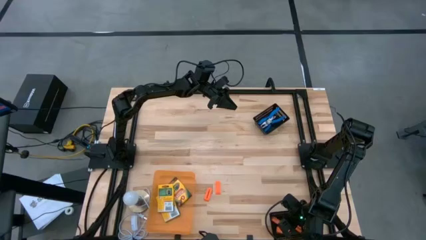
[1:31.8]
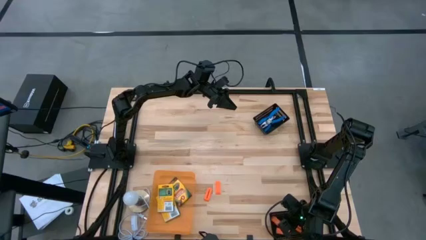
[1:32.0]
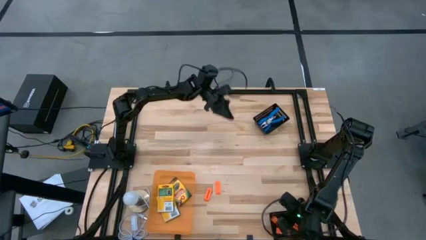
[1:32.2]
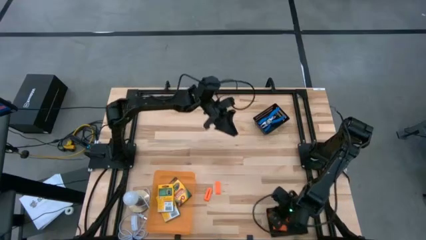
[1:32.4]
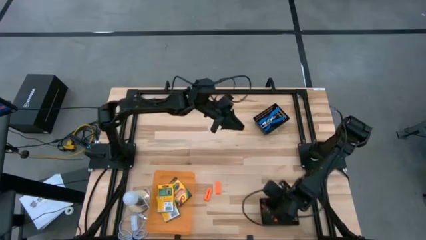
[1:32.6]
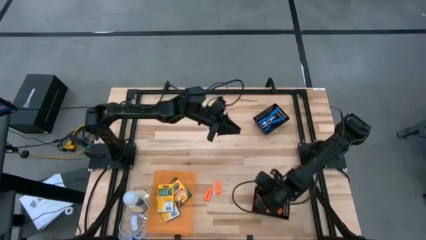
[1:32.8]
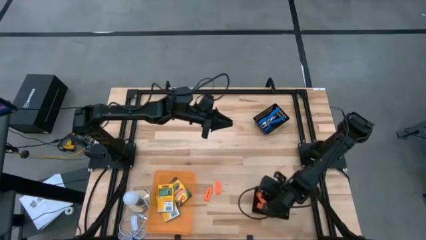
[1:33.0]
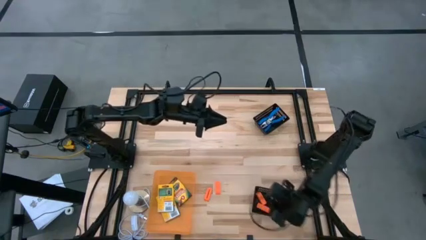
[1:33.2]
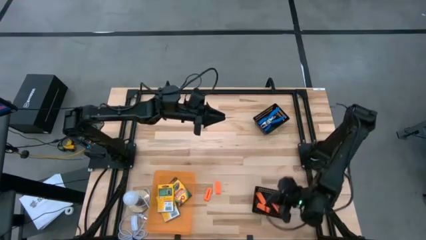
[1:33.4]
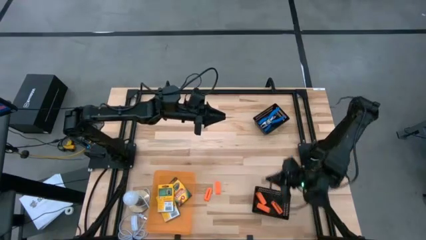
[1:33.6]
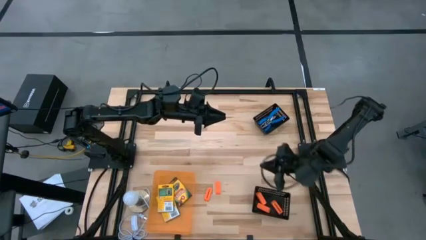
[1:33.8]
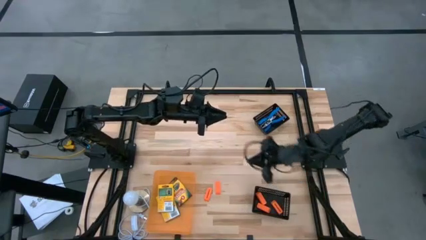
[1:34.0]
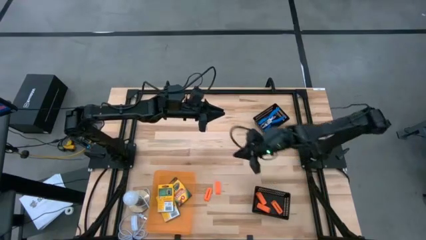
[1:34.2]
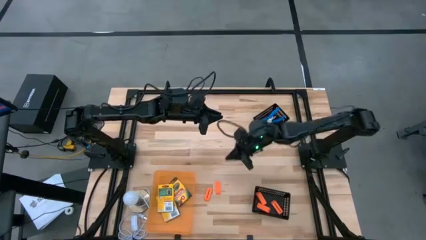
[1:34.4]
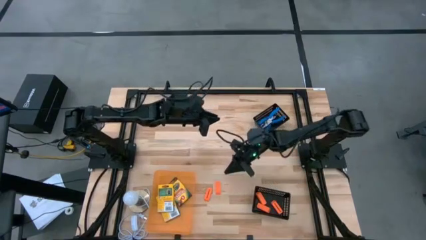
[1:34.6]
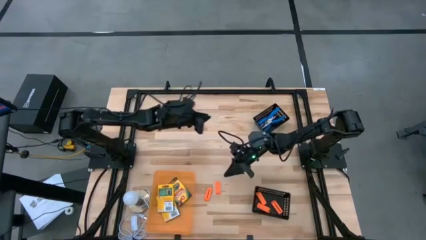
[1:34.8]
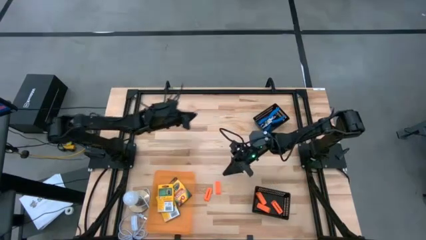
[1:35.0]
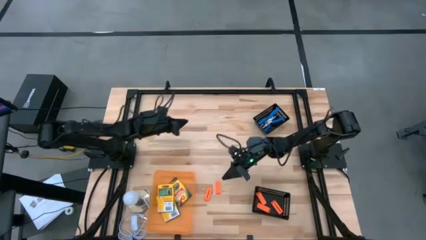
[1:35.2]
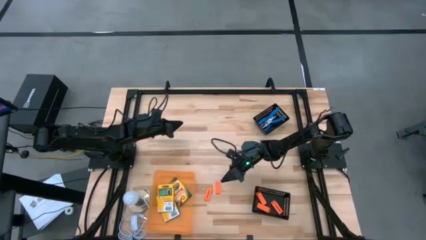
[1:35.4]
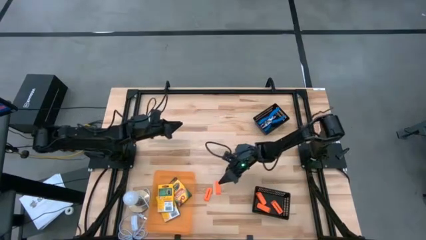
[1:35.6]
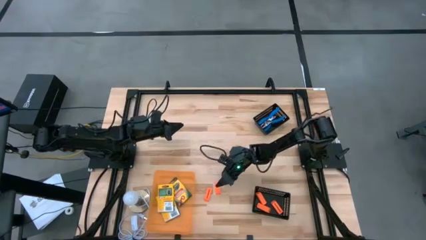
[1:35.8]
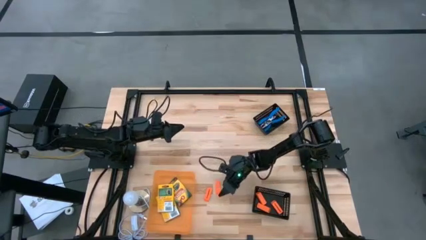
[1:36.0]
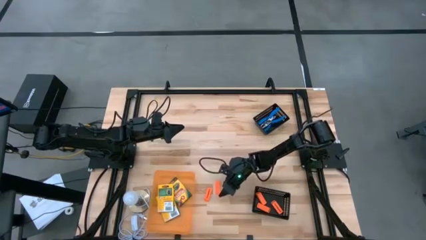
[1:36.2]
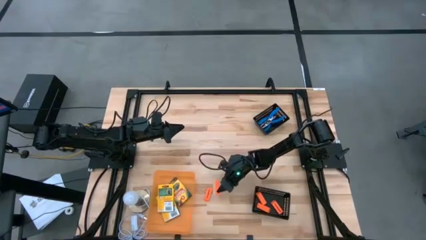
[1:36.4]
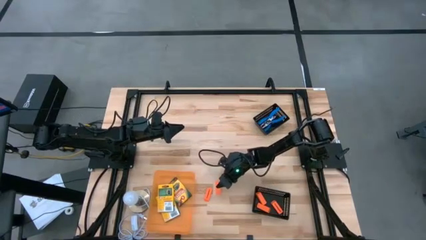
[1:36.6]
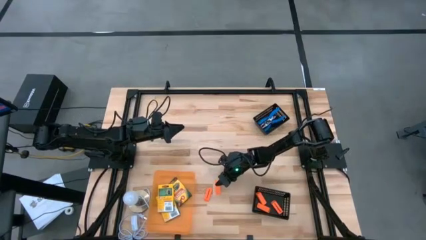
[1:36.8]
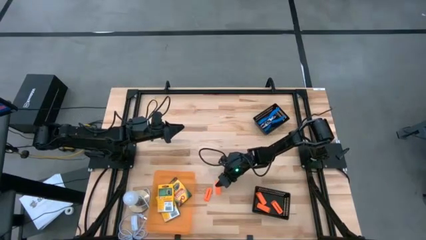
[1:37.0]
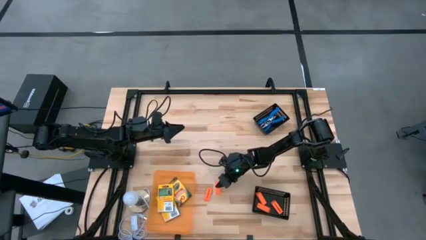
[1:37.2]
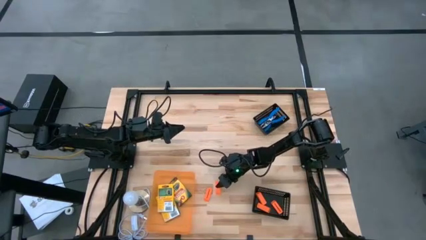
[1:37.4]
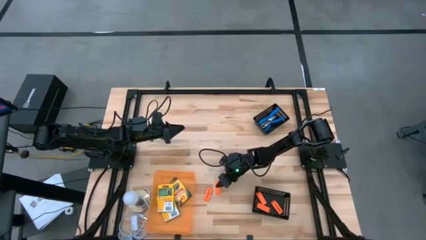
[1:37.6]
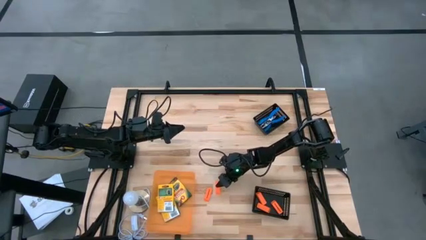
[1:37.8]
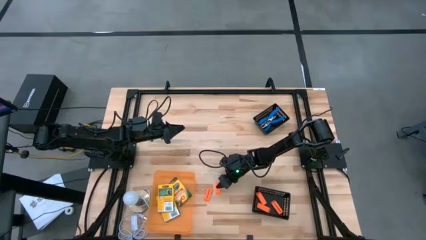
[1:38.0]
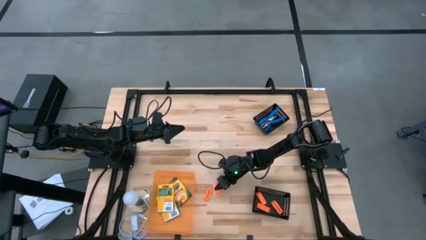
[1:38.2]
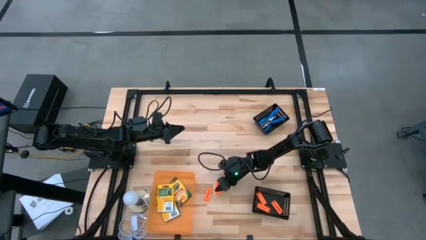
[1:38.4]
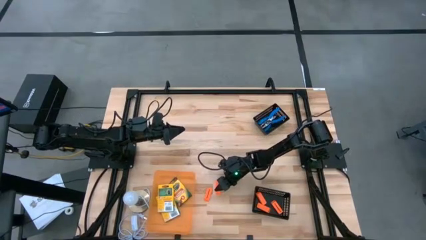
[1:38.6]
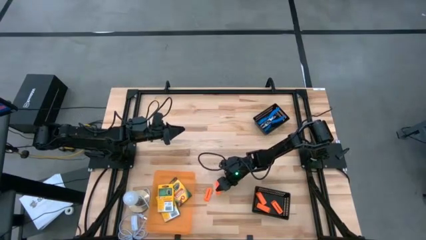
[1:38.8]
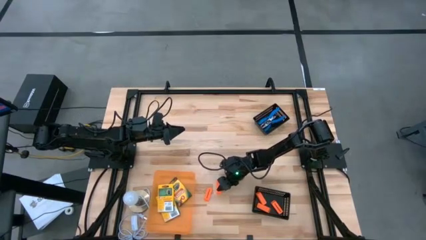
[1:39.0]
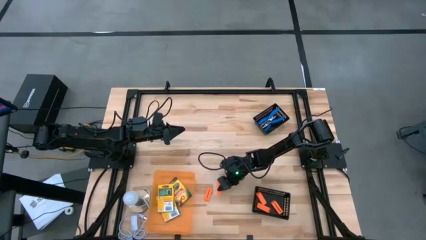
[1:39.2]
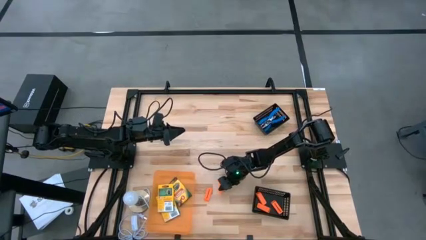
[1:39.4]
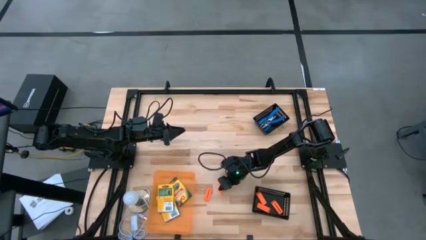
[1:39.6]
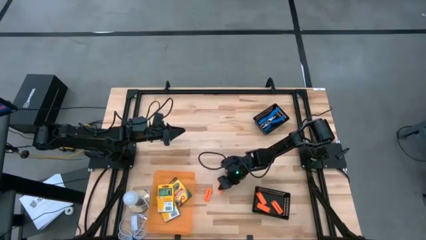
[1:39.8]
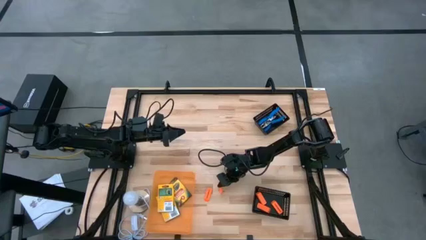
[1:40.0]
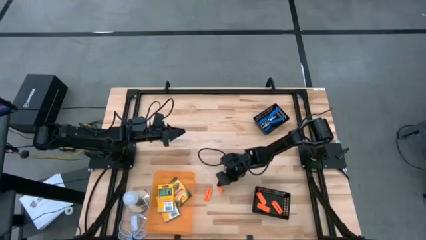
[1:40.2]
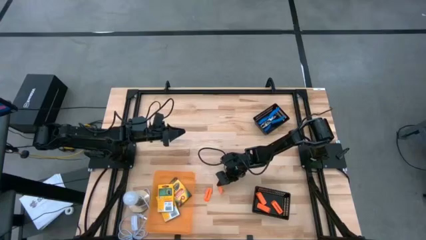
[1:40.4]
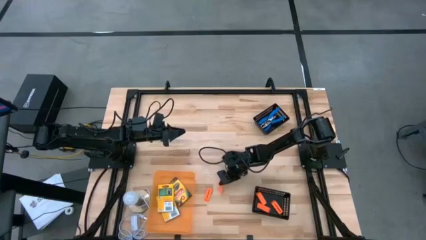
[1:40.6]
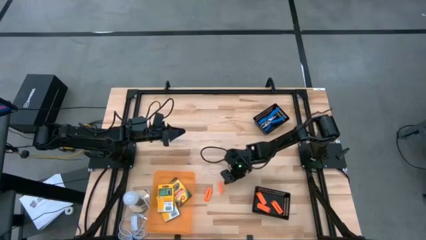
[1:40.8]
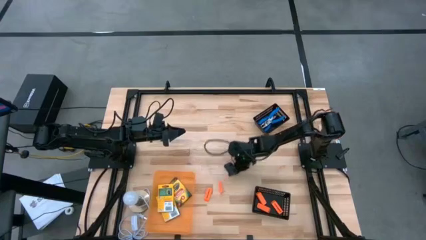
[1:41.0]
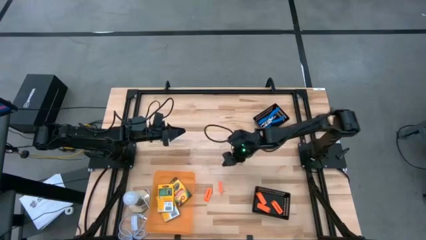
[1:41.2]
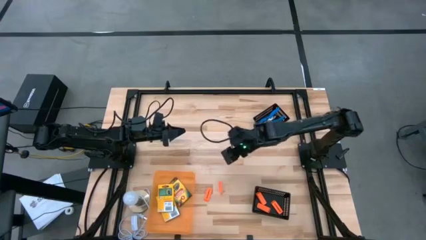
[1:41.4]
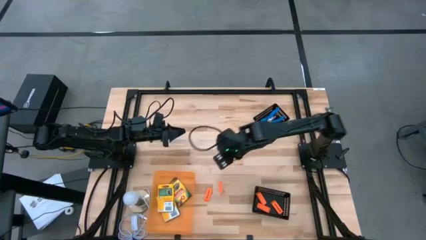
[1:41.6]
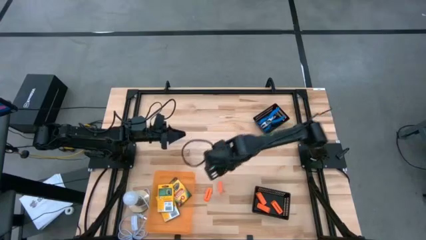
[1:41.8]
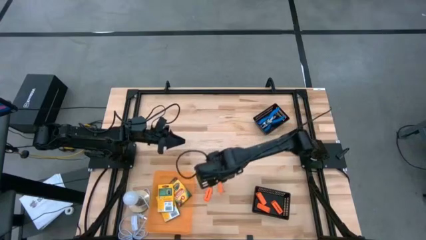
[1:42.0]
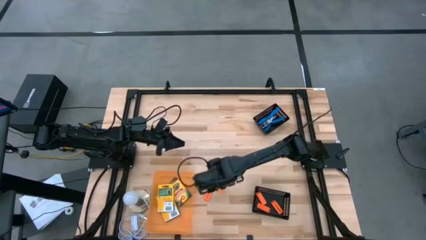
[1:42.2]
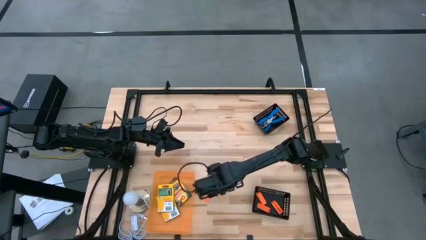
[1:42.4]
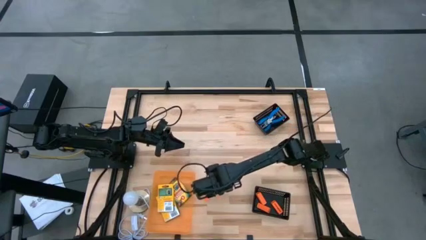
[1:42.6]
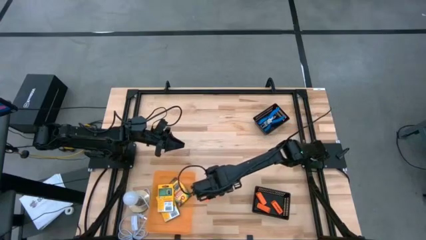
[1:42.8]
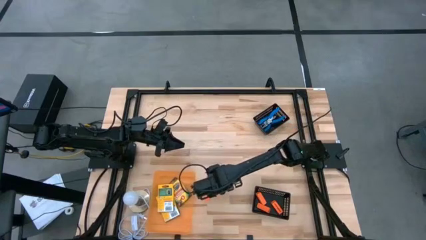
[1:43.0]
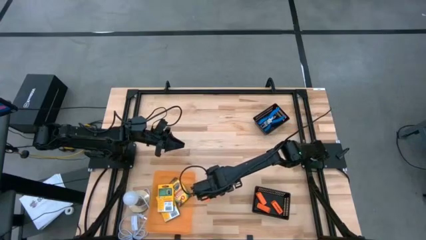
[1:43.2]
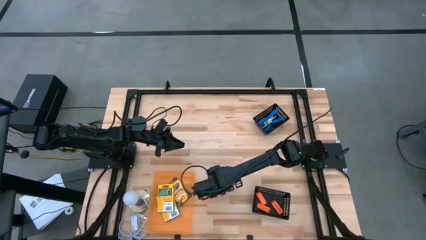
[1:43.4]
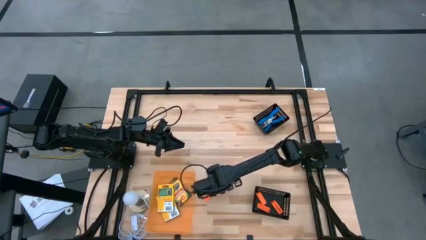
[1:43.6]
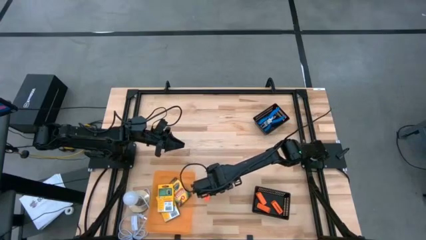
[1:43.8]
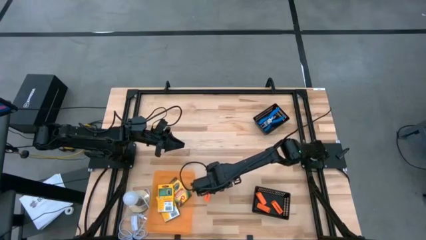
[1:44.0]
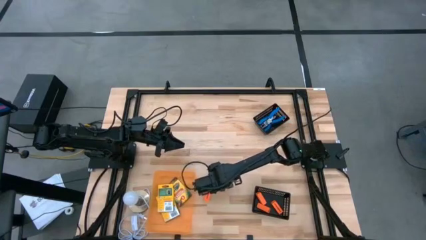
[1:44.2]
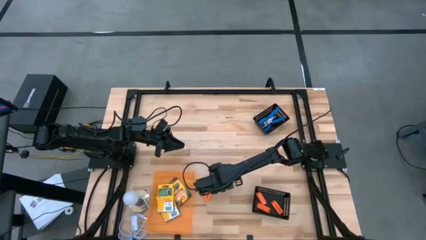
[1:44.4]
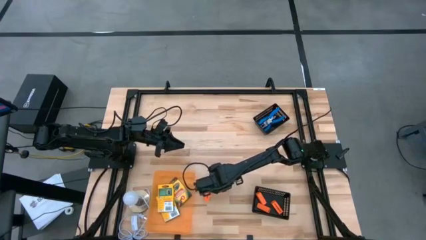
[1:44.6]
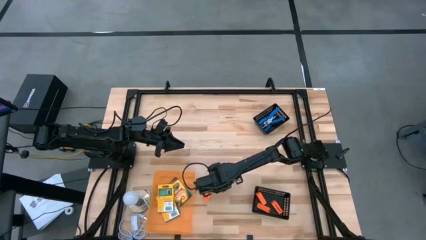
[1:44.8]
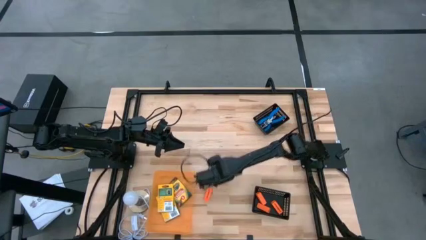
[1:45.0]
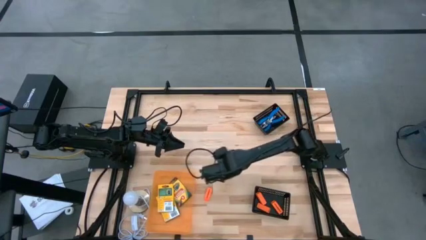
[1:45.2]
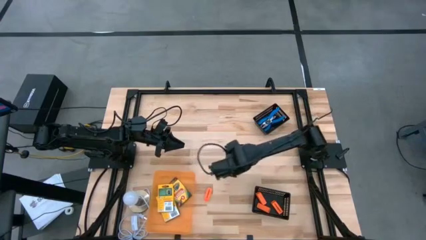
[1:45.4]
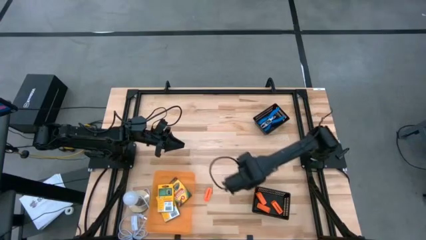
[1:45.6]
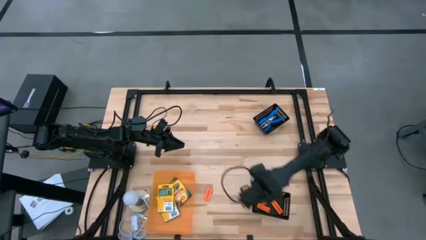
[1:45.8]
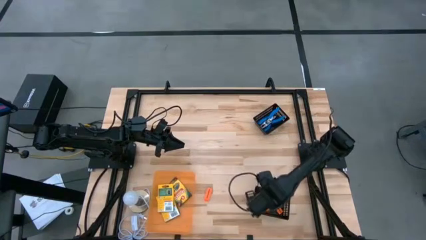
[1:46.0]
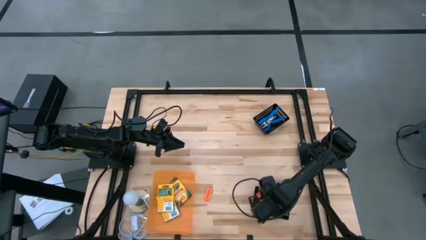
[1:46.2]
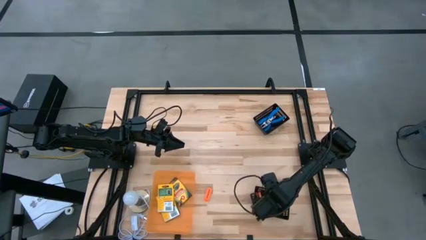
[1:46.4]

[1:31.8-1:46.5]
Task: Pick & Place School Supplies
Put the orange eraser into the bottom black bin
